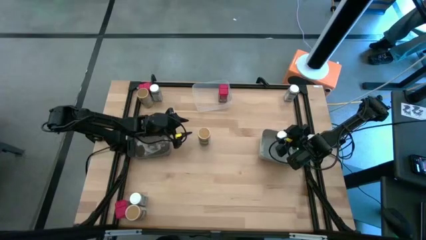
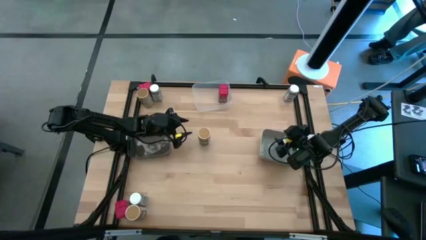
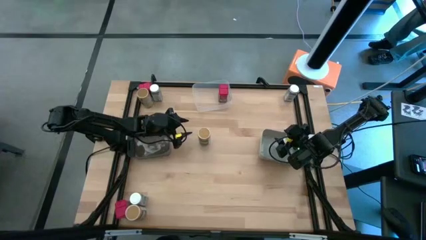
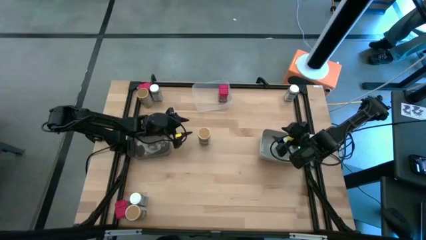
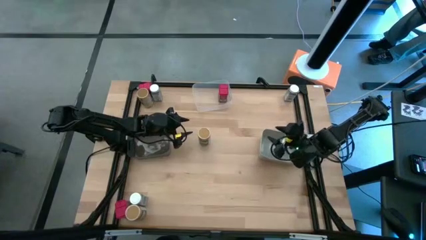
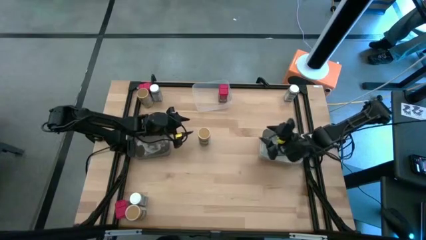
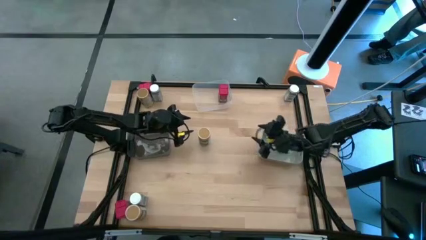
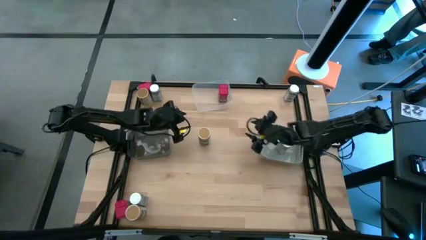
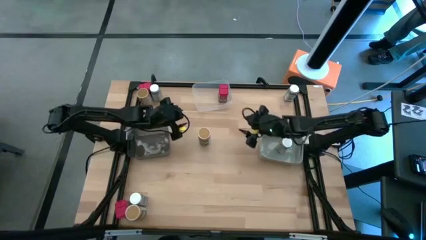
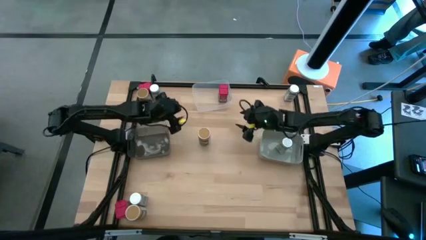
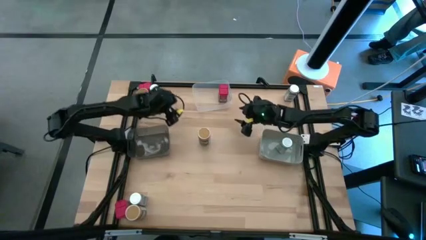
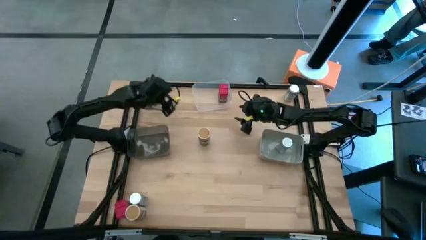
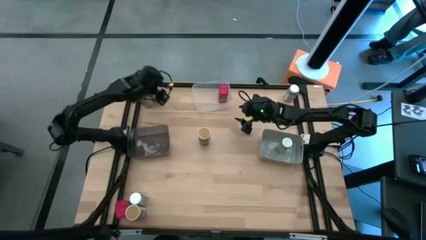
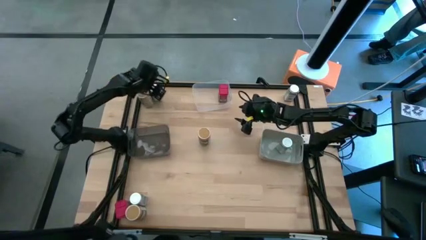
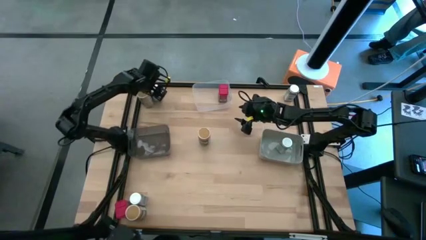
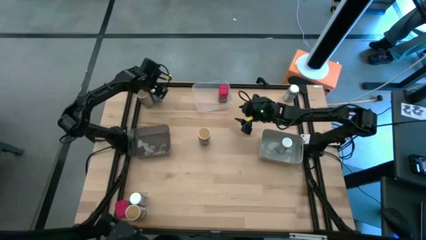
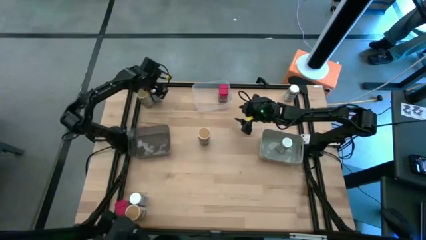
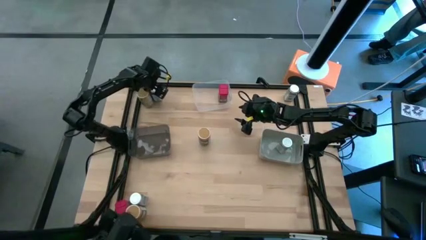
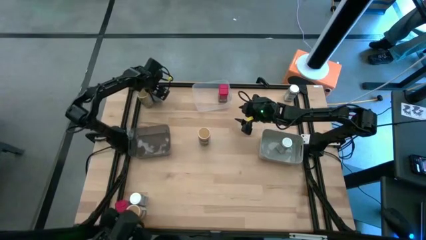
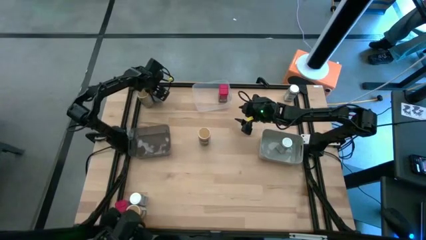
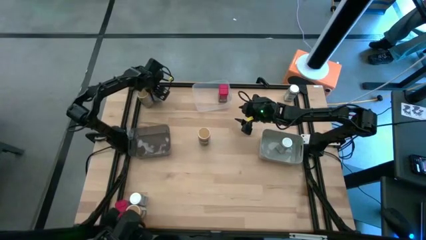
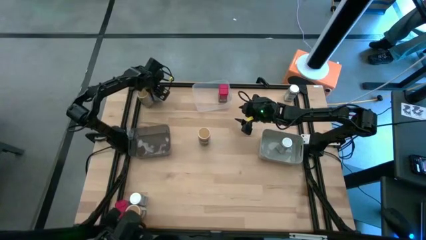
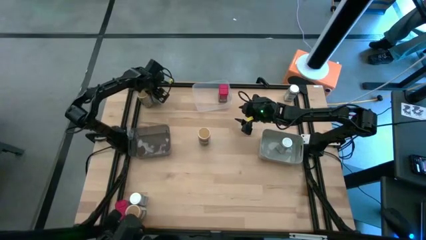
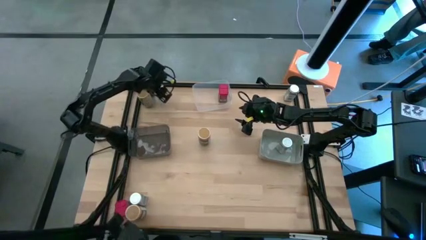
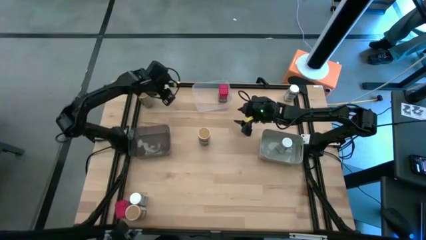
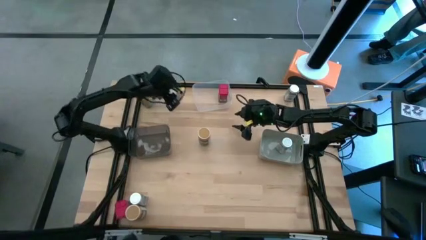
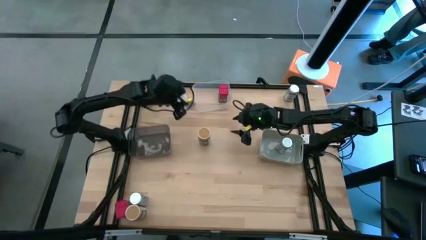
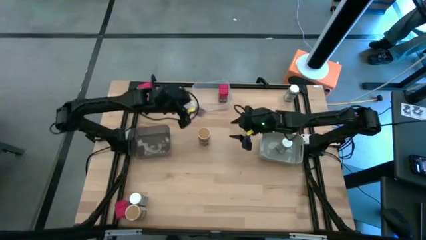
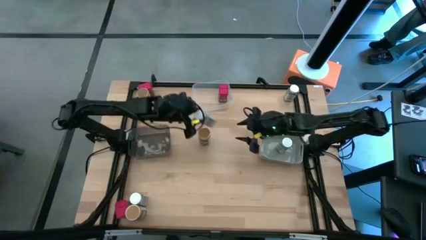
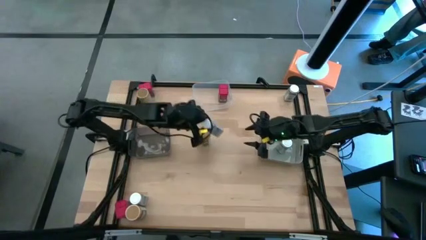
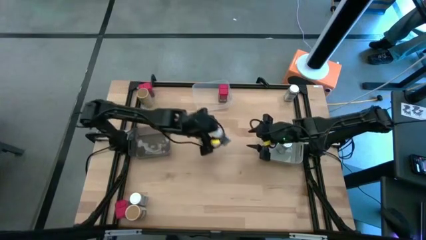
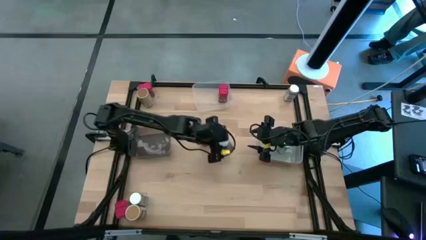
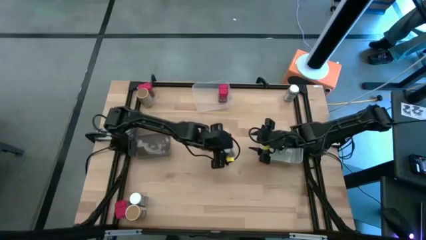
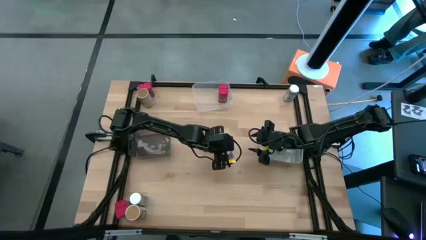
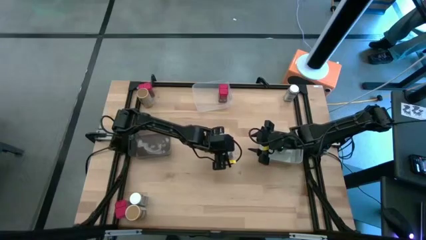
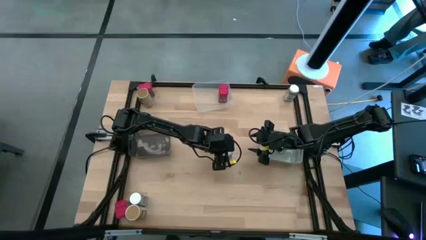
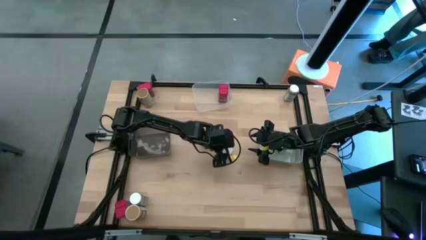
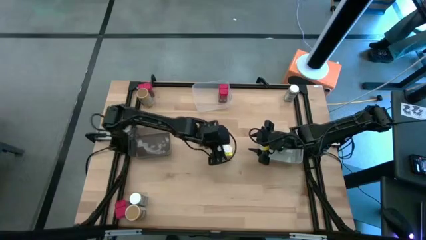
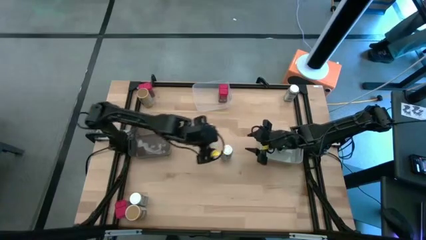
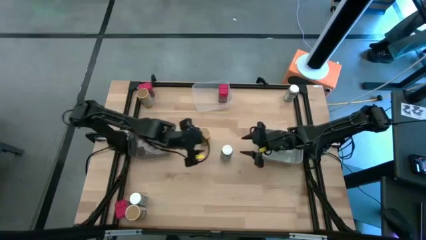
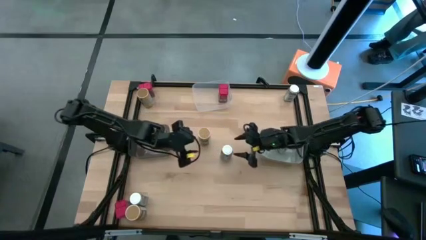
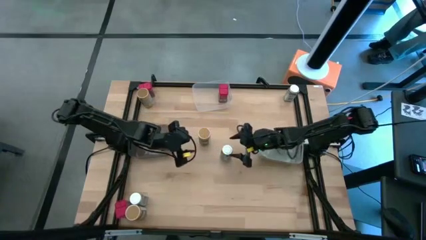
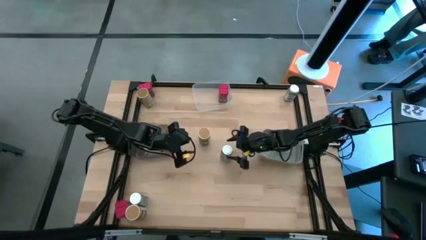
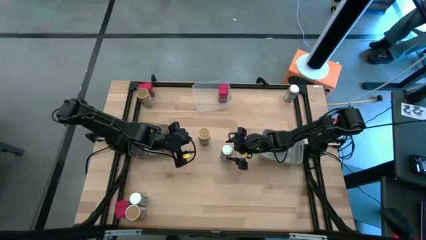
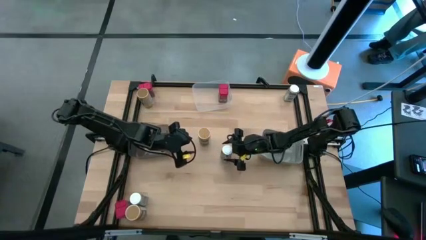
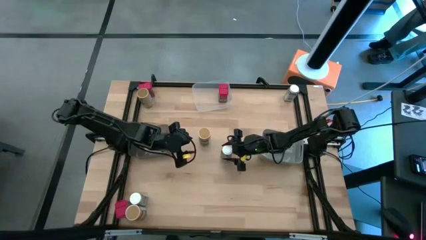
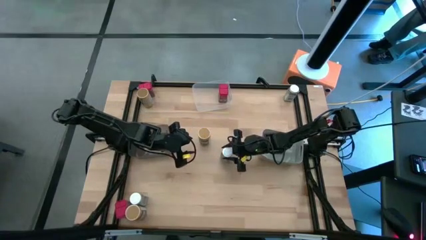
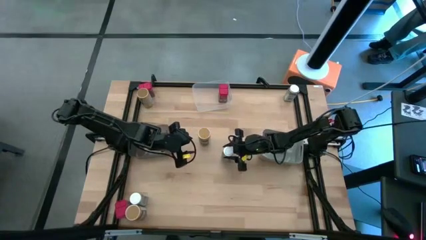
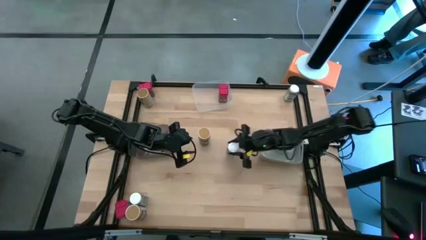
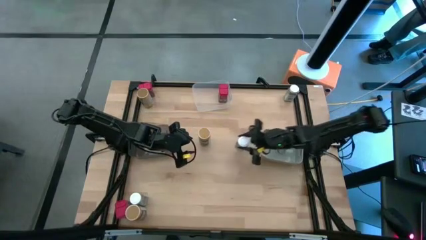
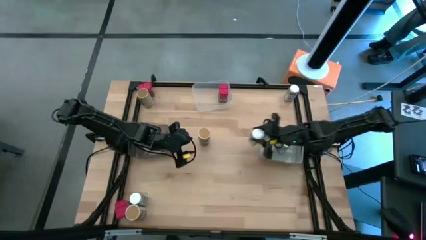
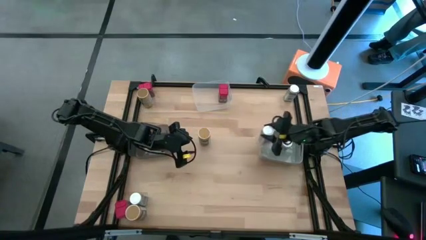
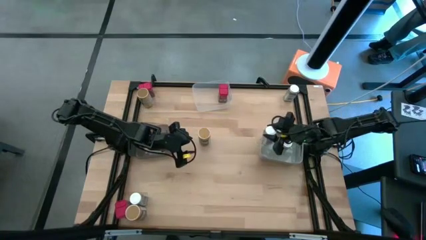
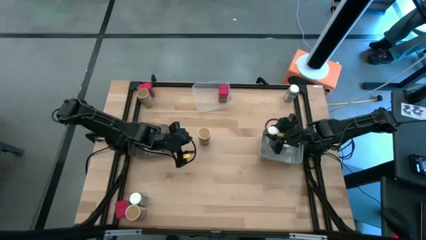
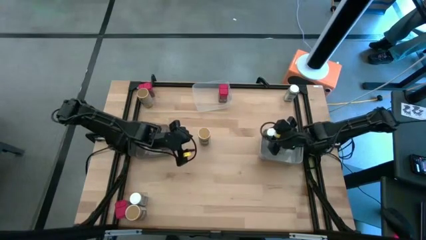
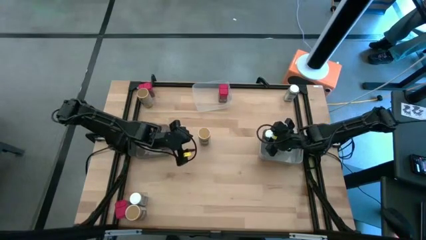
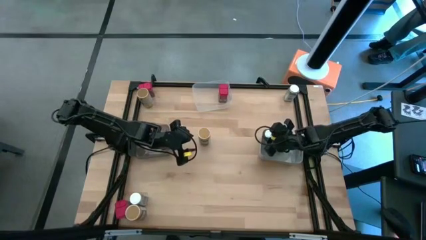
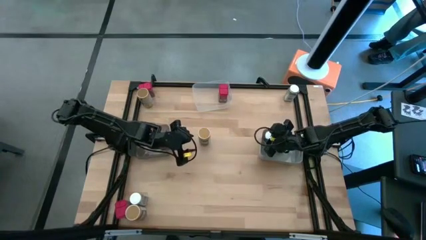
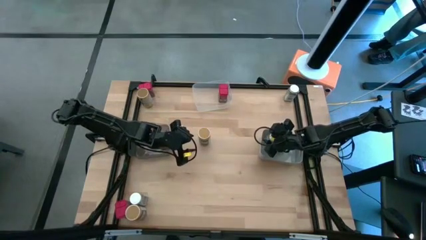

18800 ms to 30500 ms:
Task: Sort spices by type
Put the top left white spice bottle into the gray bin

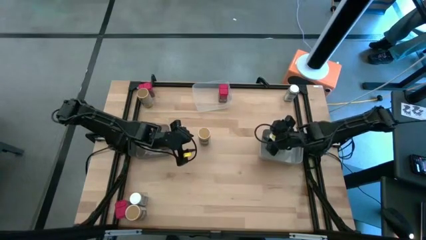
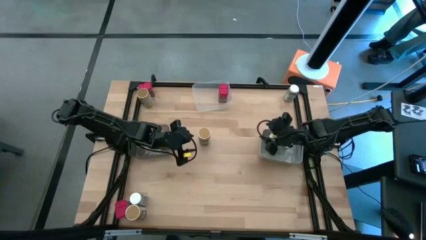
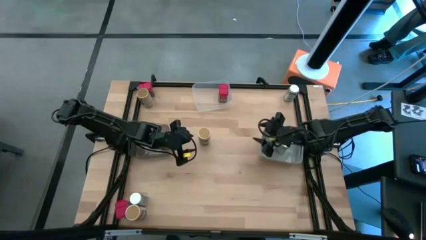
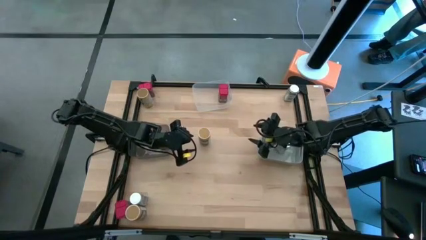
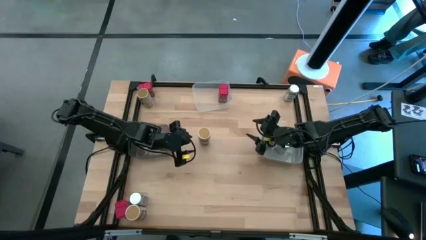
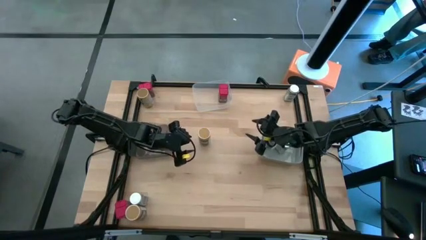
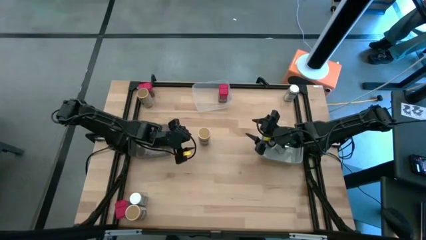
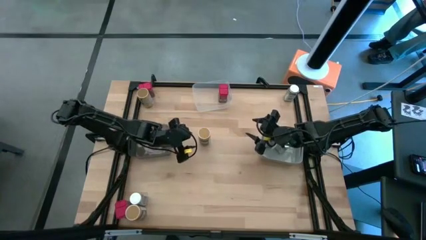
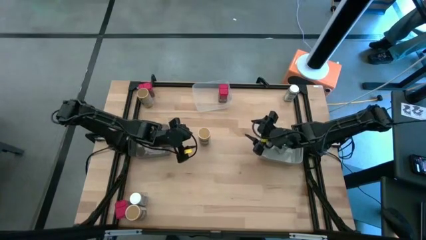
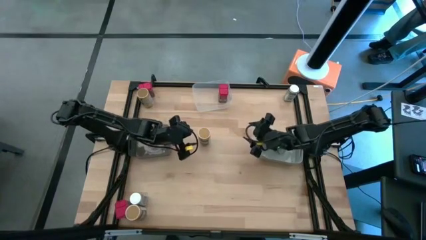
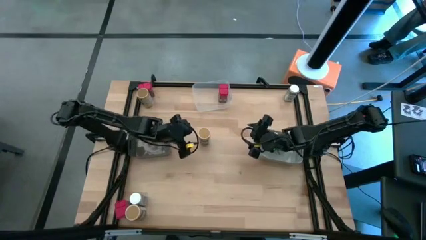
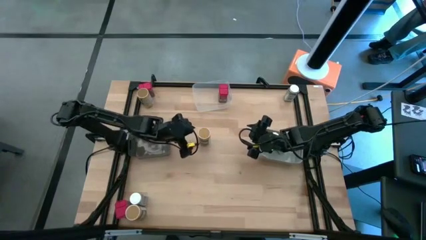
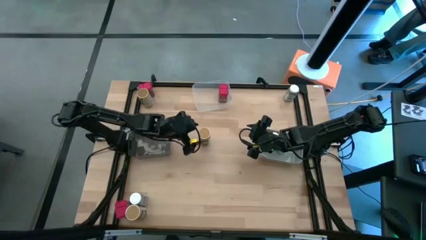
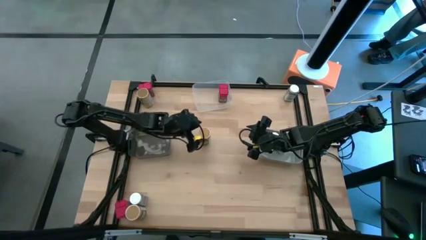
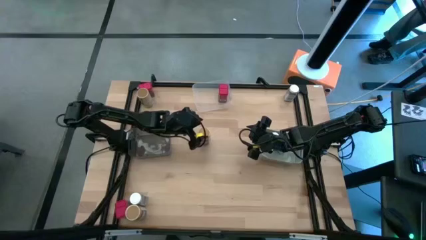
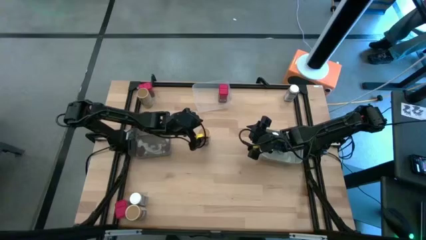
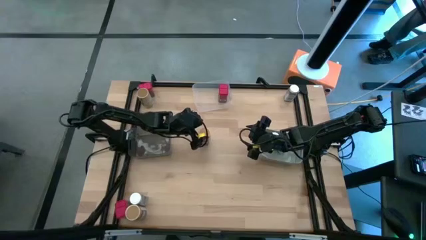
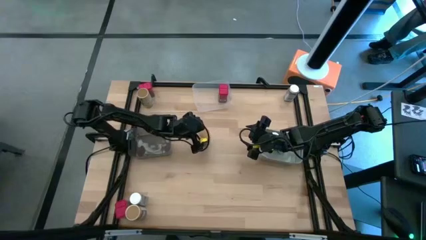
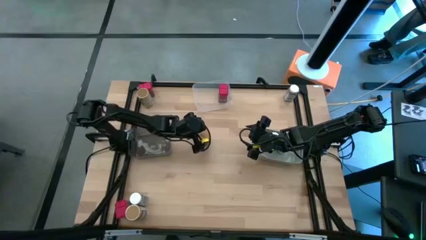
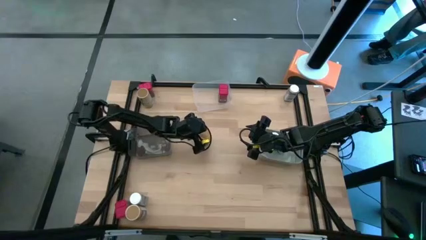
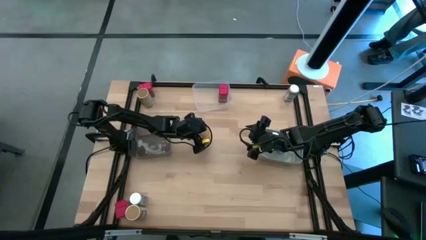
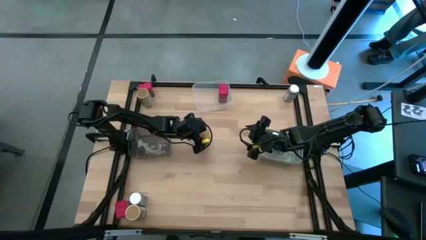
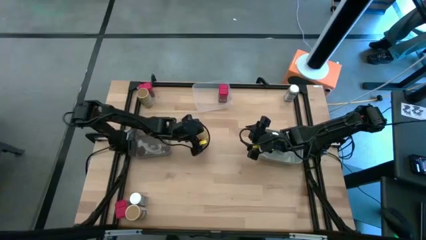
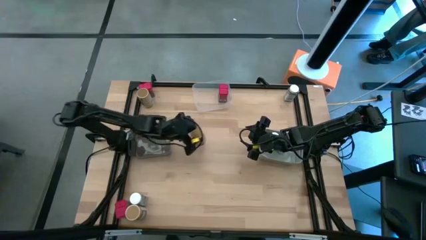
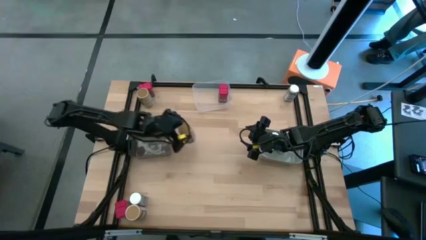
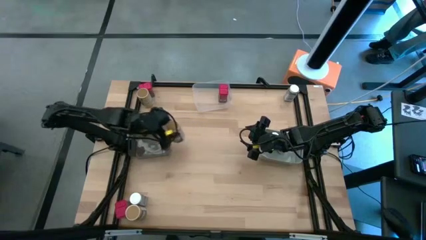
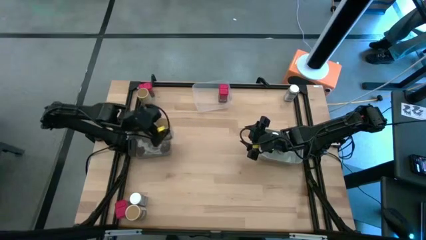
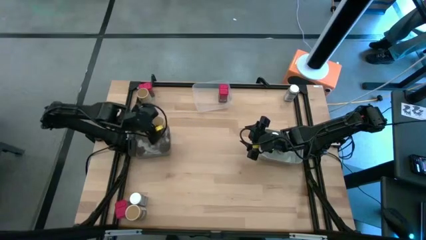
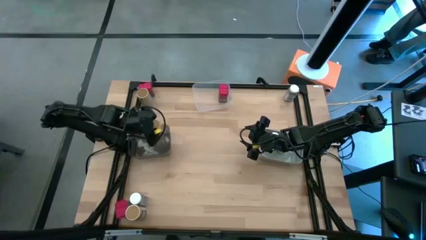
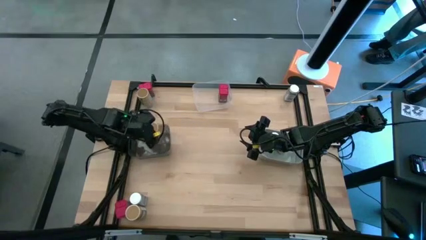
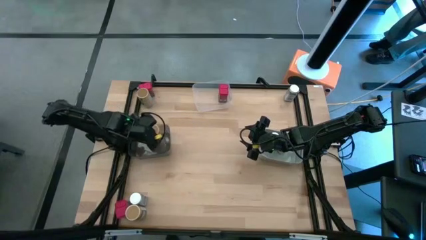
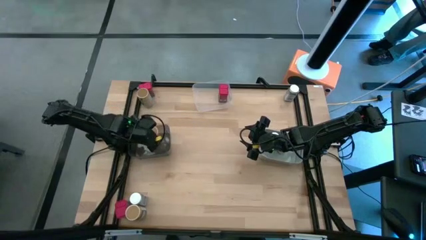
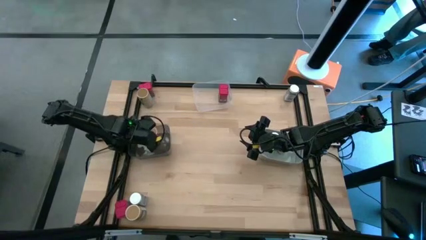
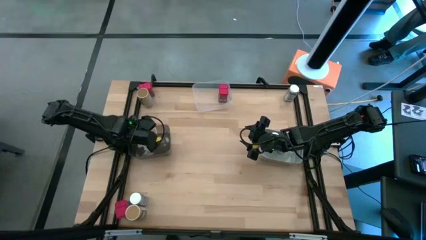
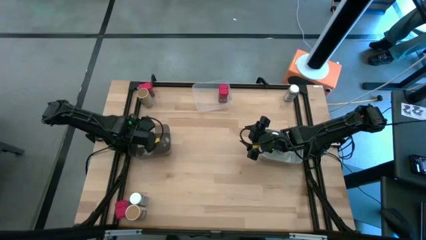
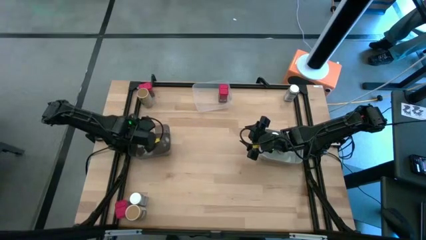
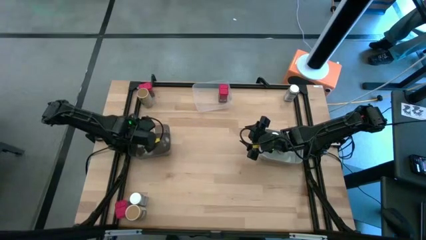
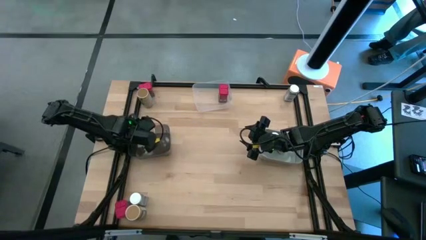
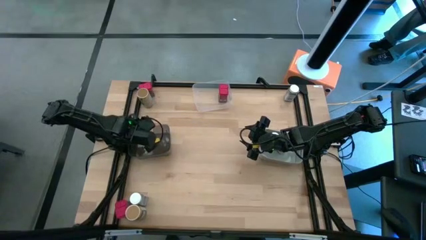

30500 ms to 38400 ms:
Put the middle brown spice bottle into the black bin
